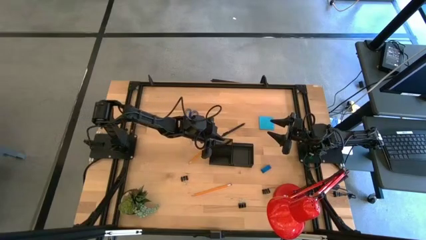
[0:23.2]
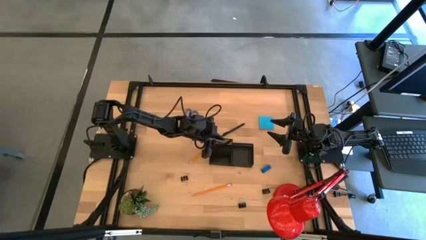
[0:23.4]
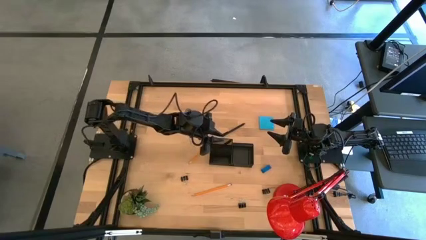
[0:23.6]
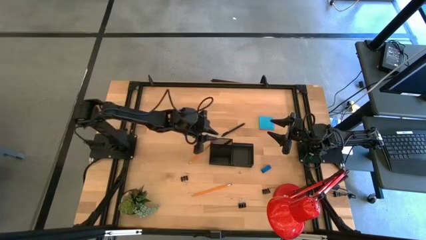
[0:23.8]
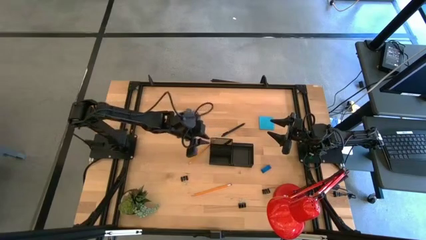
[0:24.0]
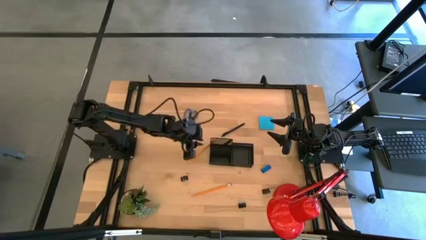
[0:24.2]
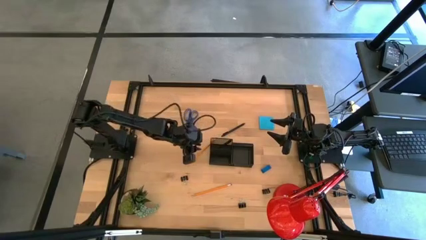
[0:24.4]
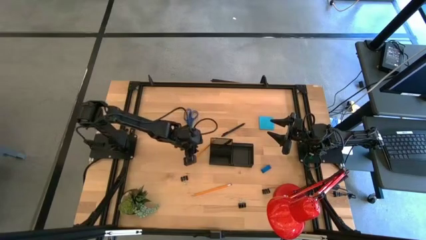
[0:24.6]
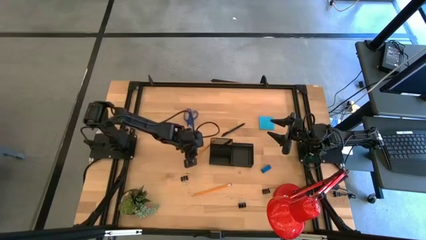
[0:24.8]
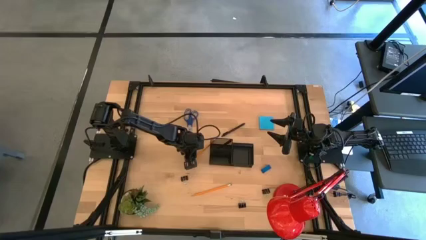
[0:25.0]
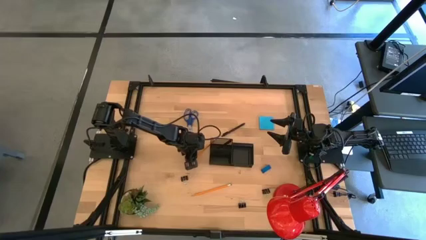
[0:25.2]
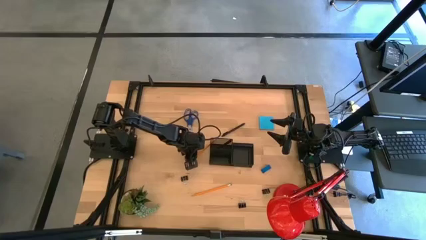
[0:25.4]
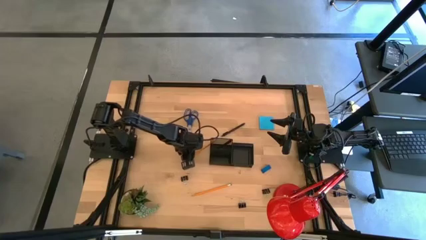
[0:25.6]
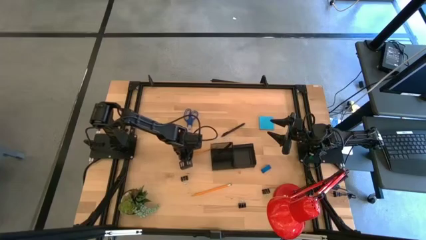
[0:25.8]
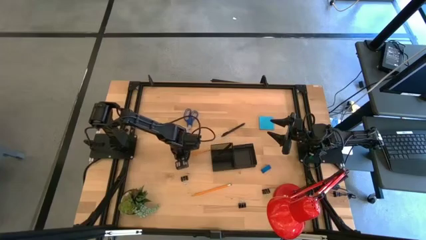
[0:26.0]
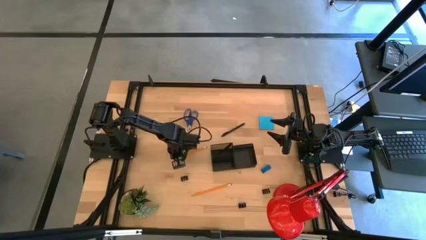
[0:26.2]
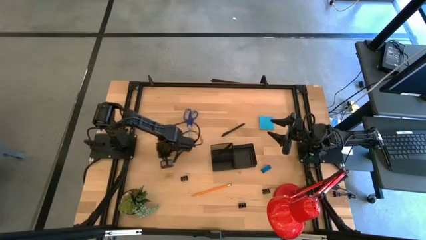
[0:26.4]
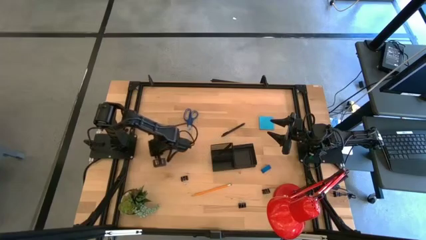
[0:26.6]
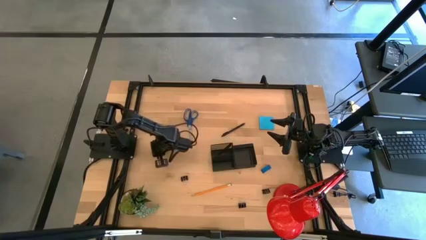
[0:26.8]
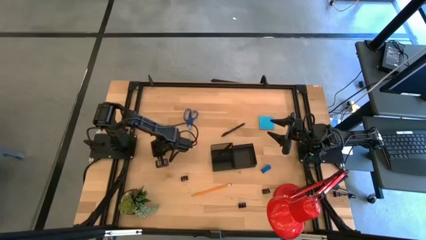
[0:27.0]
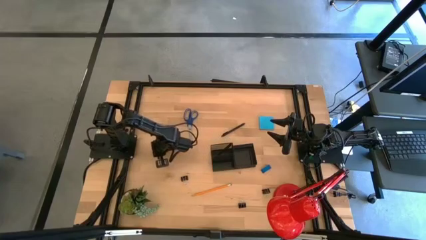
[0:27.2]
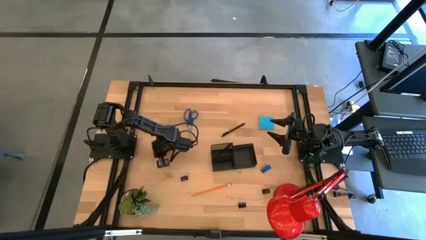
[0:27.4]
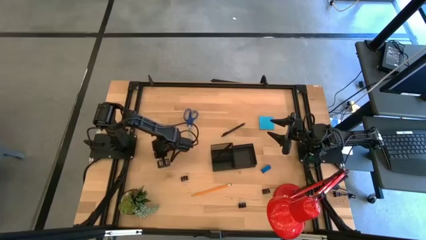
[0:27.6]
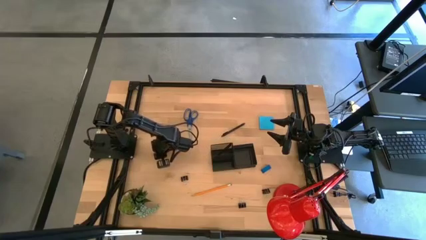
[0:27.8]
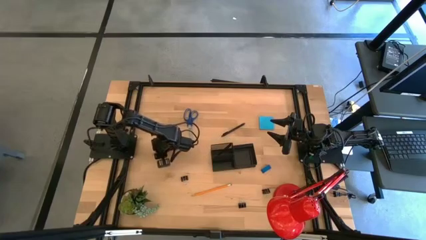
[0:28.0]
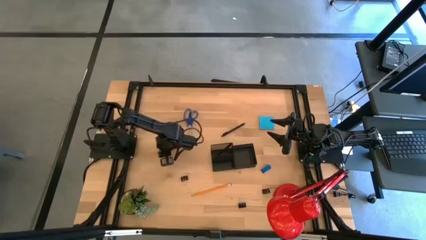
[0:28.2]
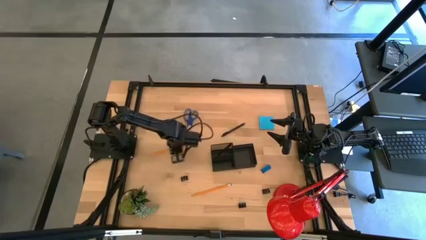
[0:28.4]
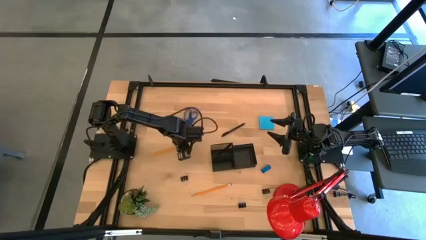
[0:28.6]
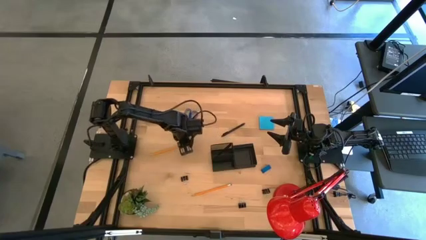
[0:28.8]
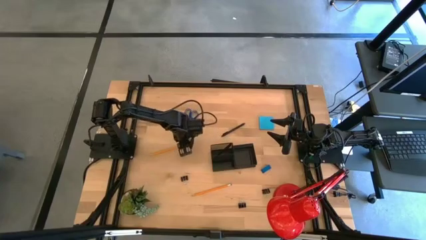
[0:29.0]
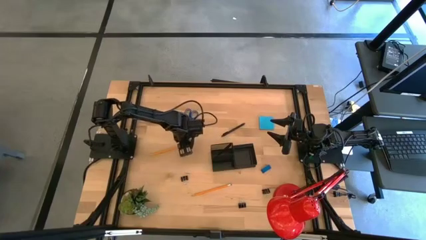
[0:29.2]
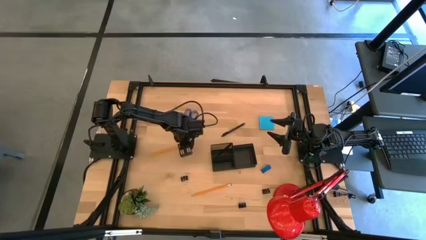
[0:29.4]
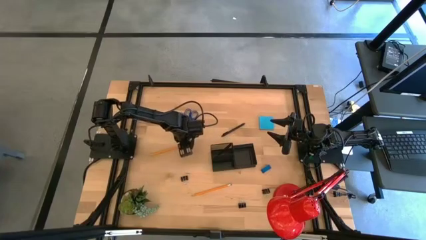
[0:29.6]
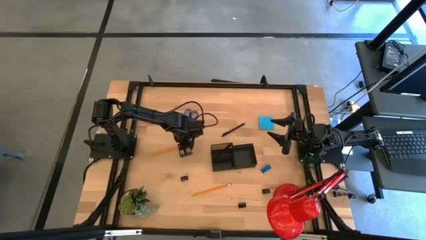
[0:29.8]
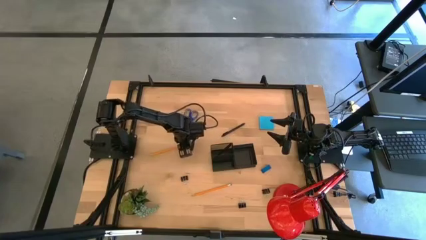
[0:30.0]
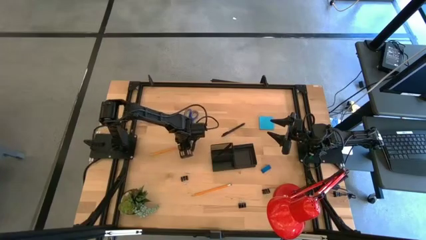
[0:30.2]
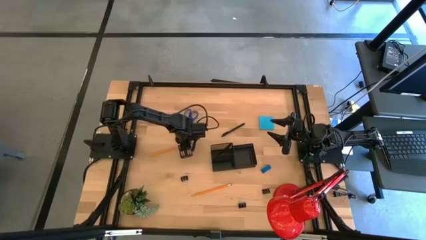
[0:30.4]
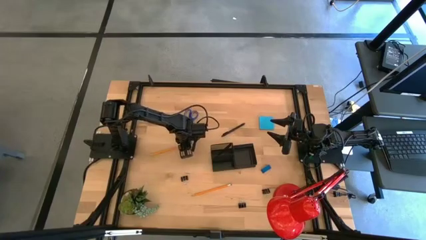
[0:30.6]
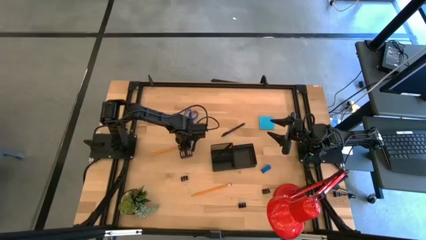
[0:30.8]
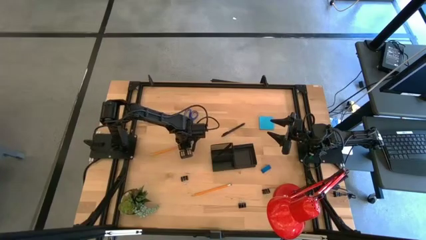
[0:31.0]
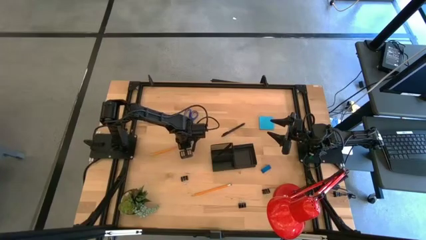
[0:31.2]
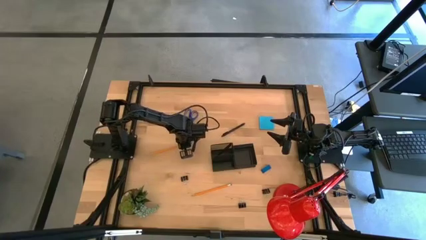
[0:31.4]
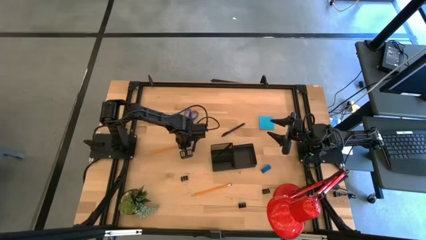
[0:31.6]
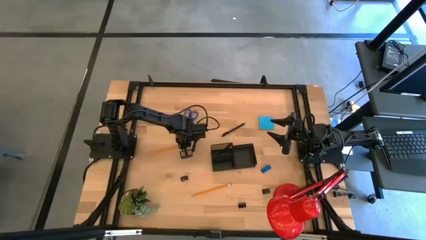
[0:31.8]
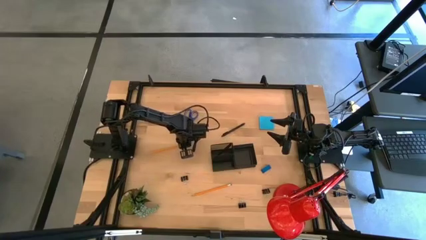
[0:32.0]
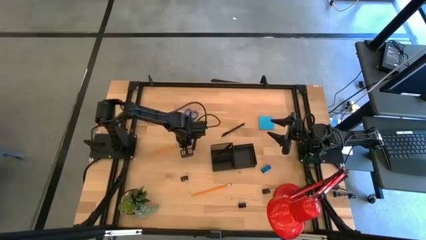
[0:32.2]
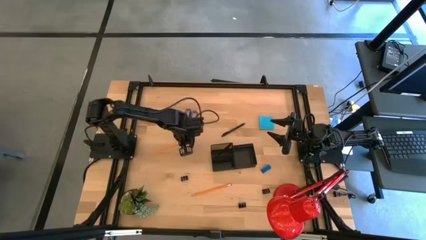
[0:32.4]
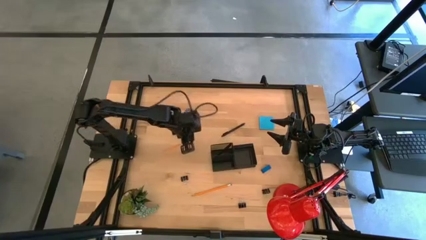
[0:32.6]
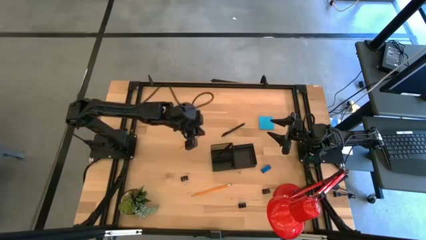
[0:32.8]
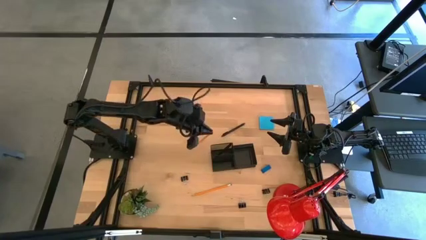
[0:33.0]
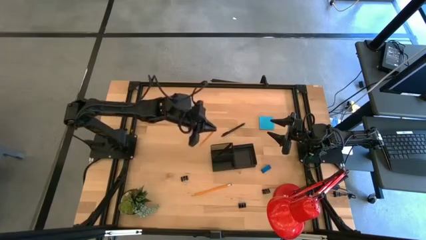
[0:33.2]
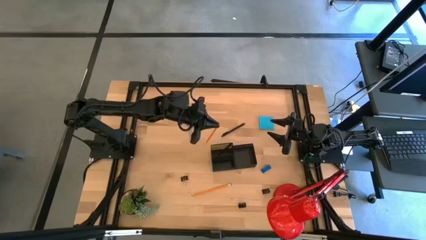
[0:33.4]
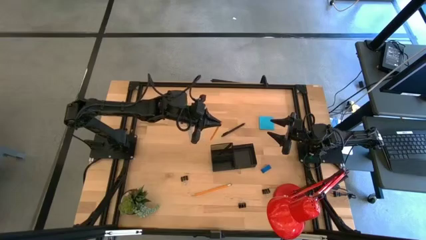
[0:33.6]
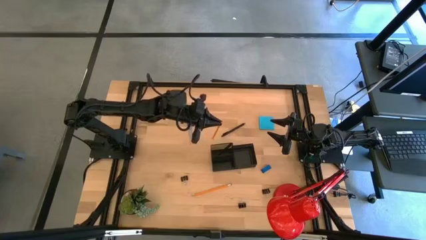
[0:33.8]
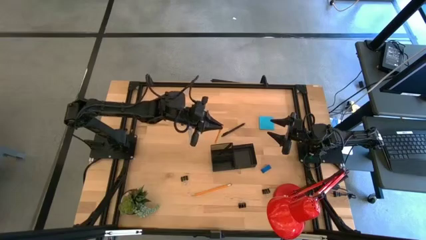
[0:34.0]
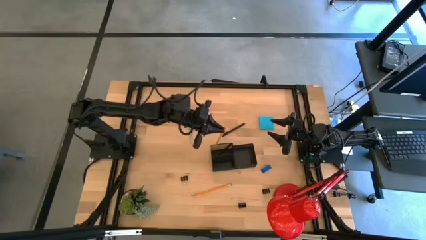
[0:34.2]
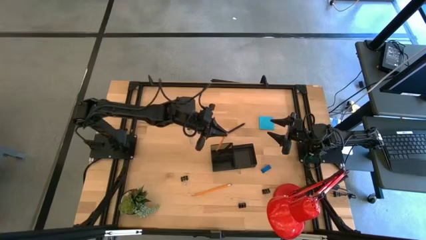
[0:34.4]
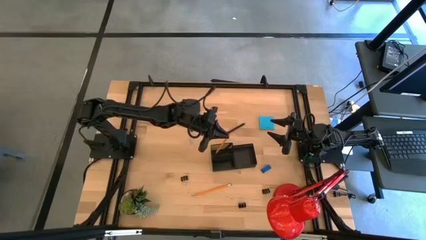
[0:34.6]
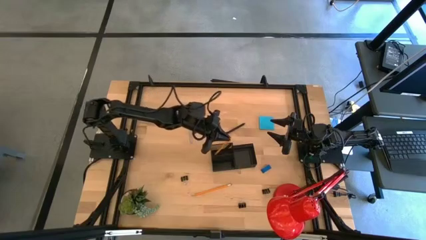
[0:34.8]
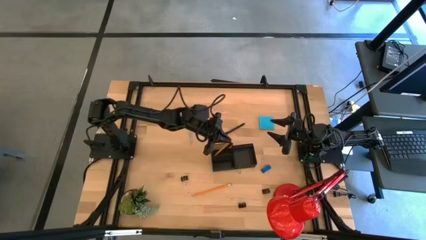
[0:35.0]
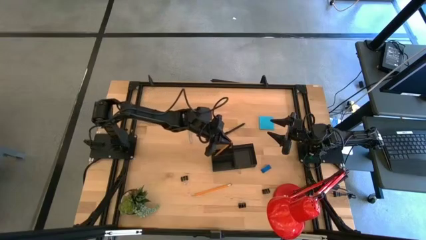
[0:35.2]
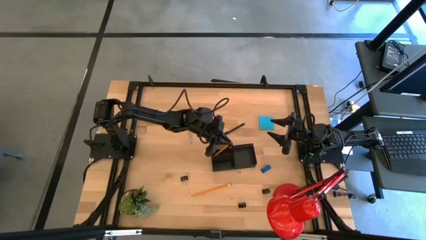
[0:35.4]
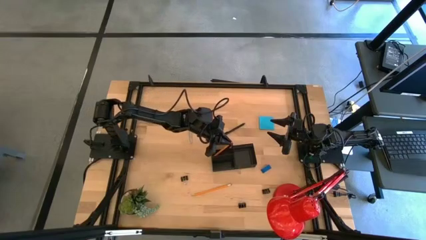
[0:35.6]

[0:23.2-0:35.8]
Task: Pick and place office supplies into organizer
Put the top yellow pencil into the black desk organizer

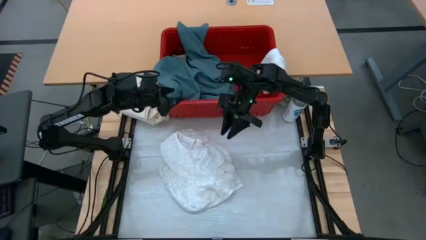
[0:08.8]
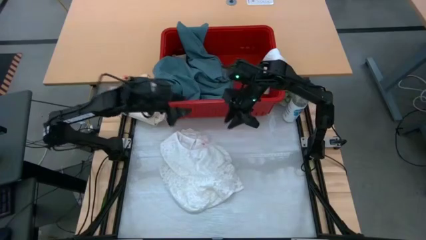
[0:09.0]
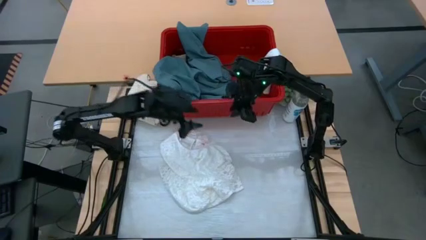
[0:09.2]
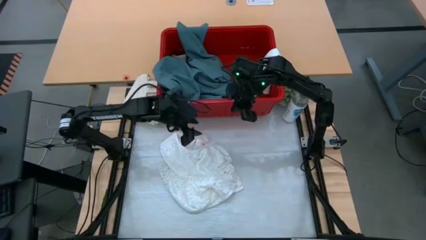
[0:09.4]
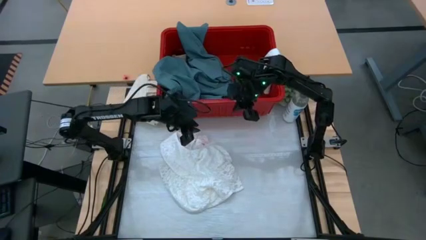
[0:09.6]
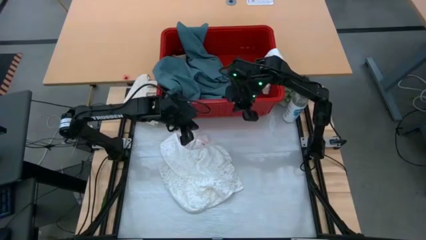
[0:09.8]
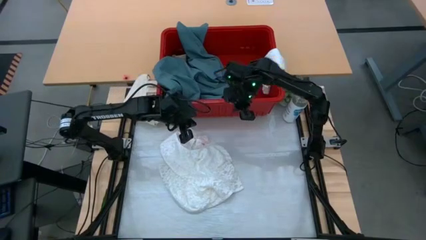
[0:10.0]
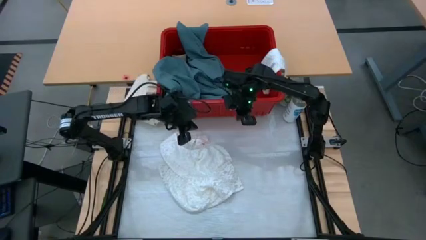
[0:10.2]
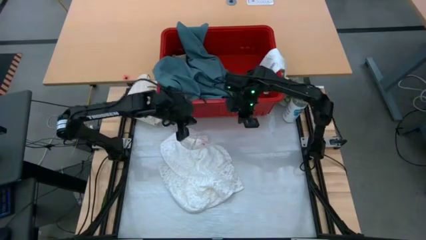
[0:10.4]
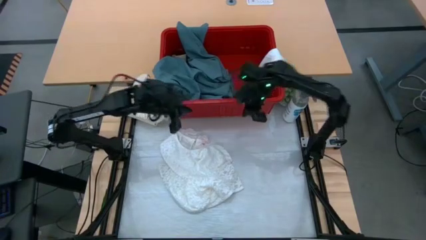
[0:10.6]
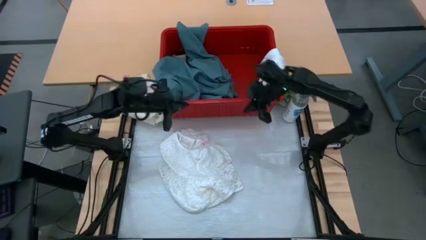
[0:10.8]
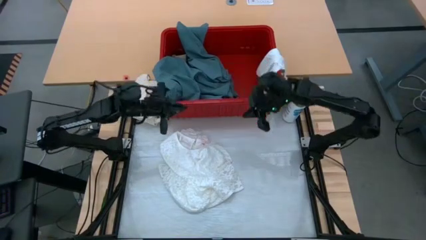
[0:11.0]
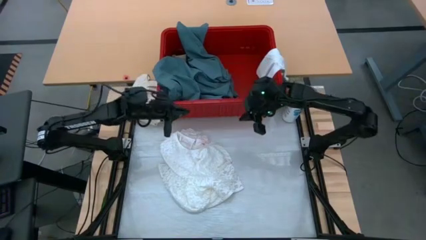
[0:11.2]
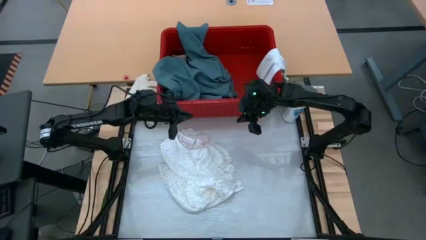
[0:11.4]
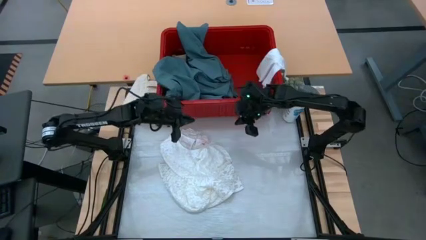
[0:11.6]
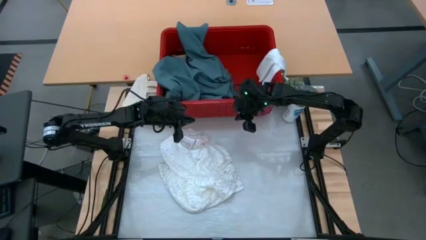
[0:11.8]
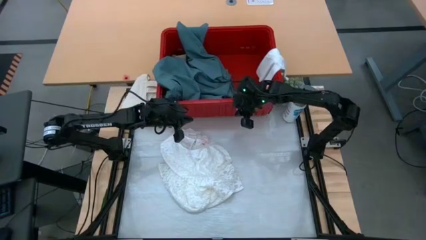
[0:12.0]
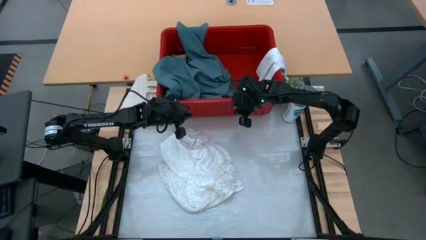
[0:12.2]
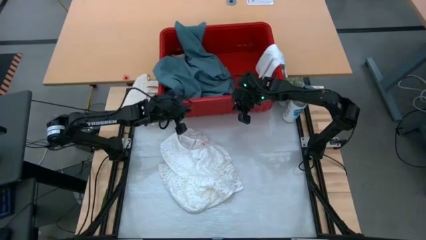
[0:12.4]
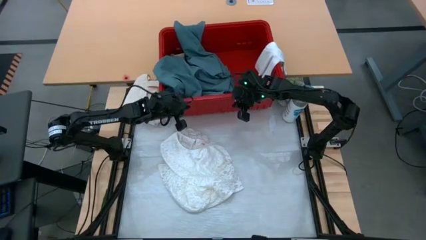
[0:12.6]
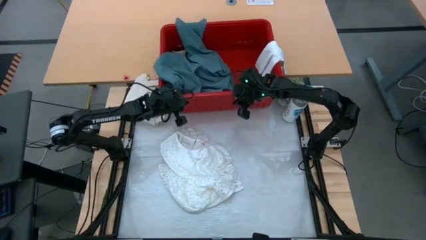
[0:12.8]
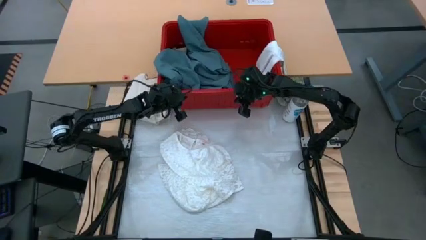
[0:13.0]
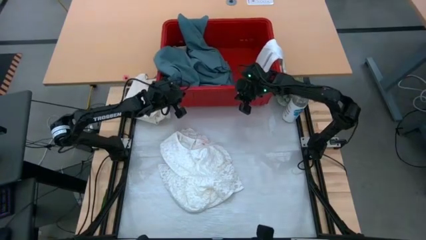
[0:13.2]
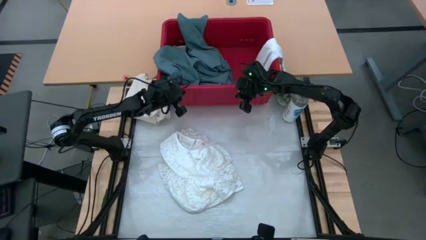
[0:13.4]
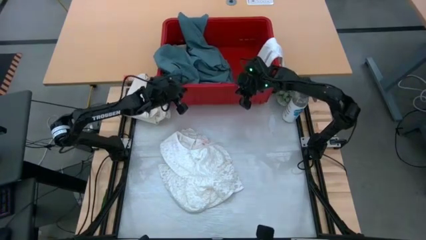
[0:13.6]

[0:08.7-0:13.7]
Task: Fold Laundry from Bin
Move the red organizer bin to the other table
